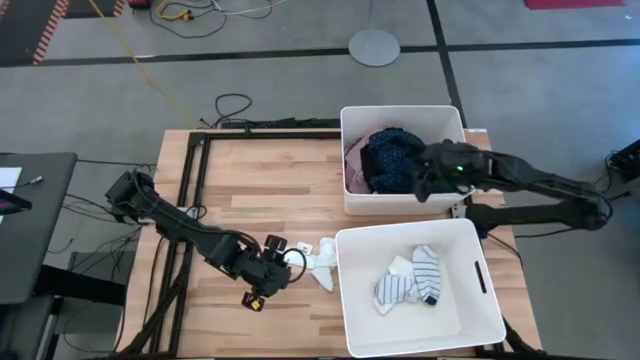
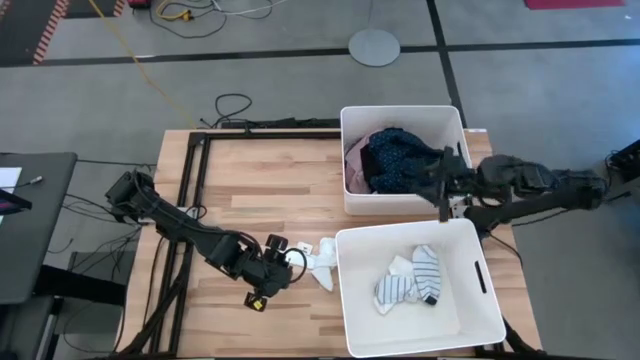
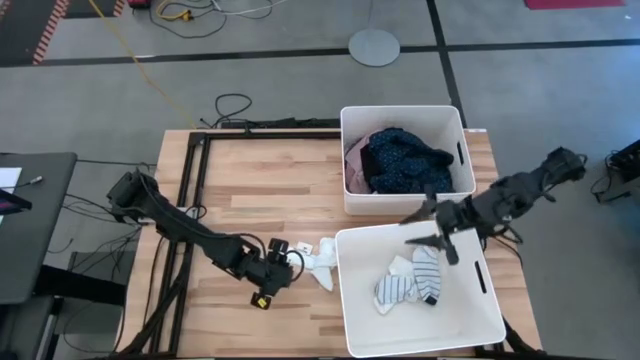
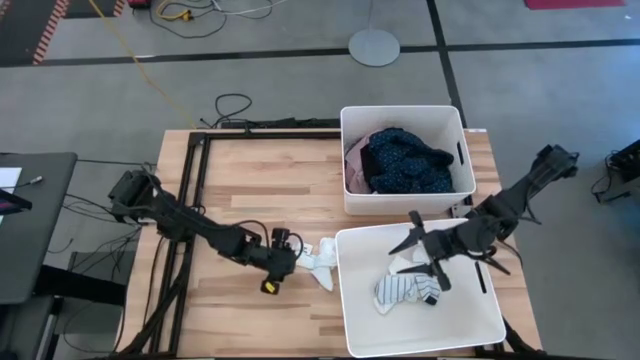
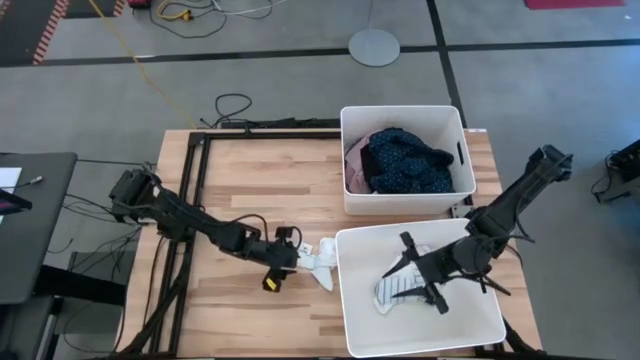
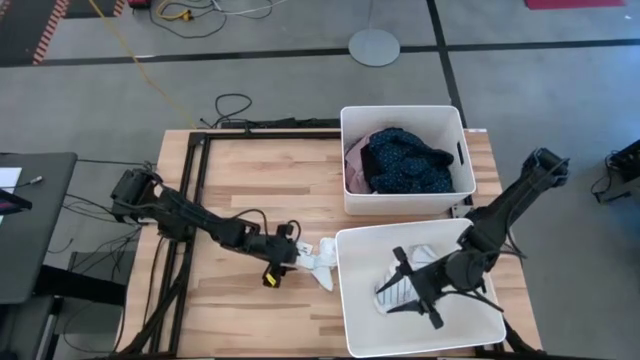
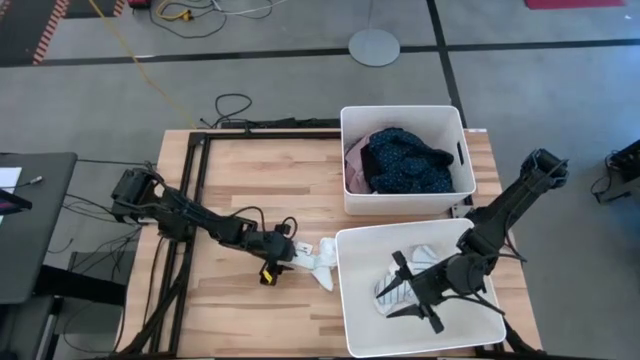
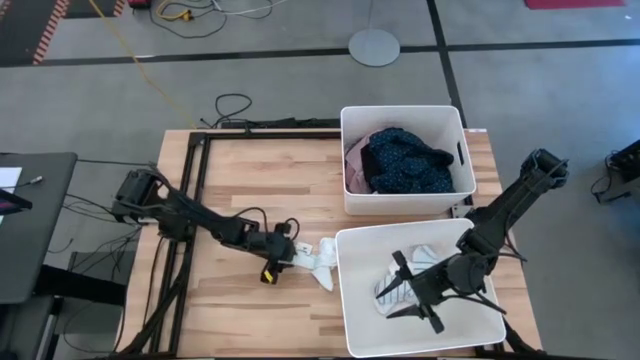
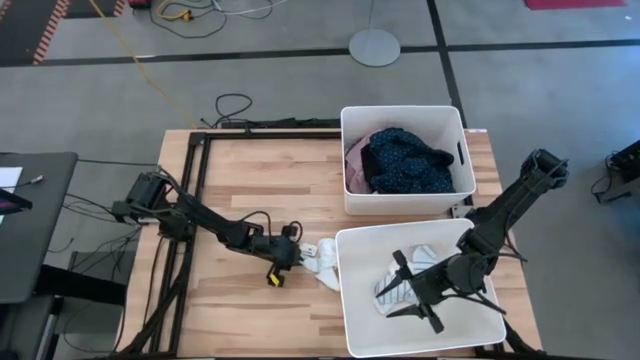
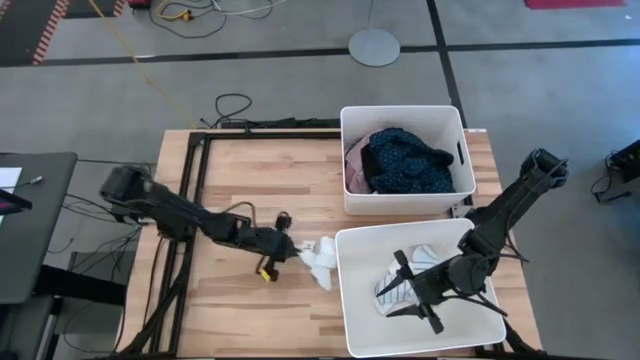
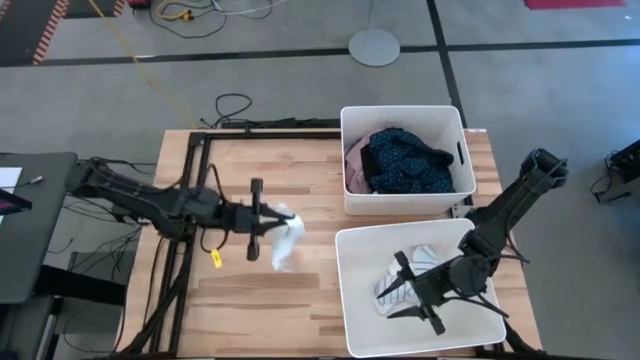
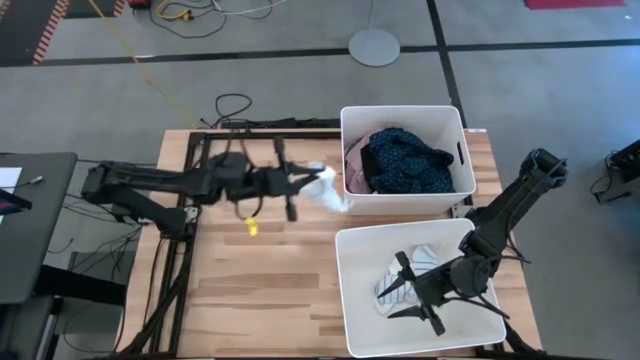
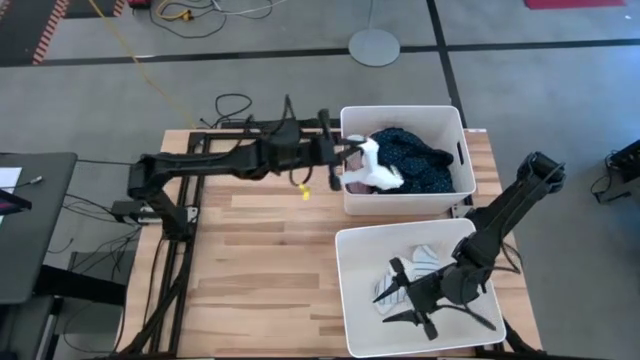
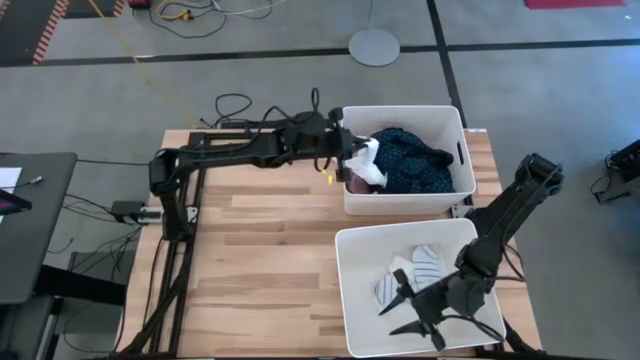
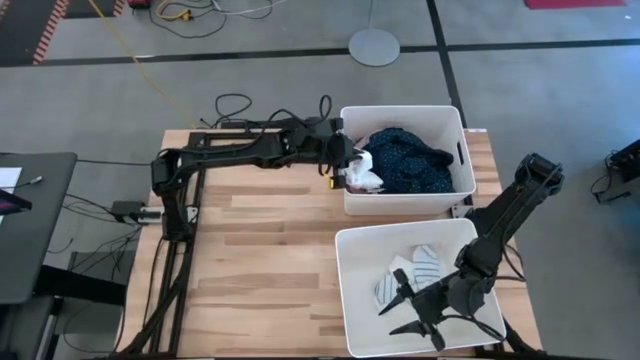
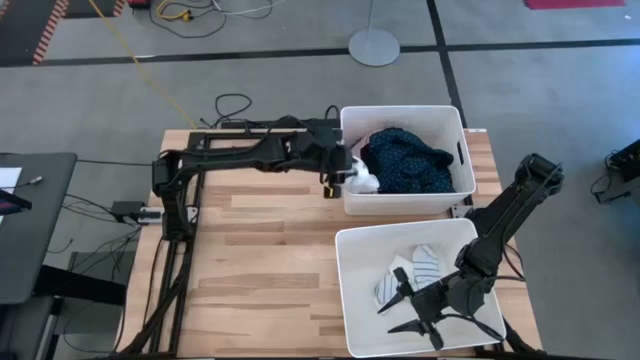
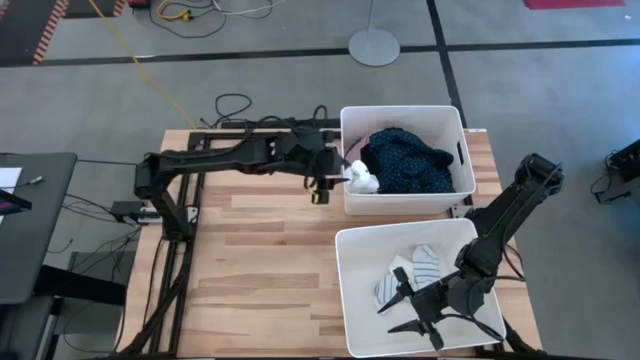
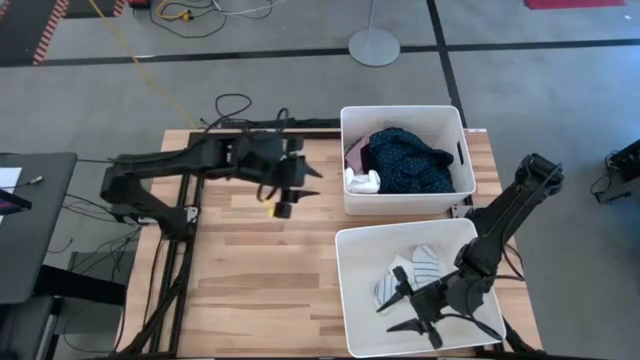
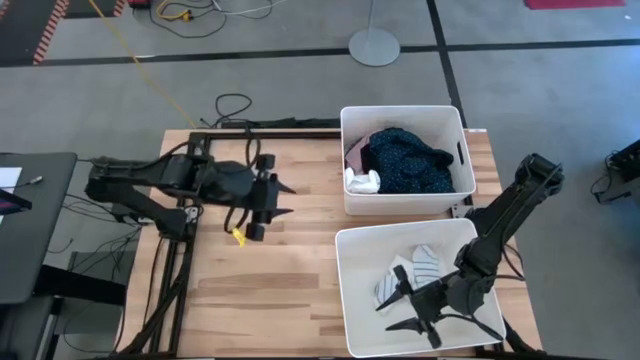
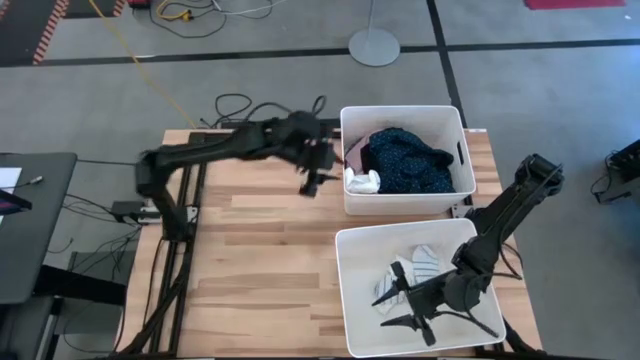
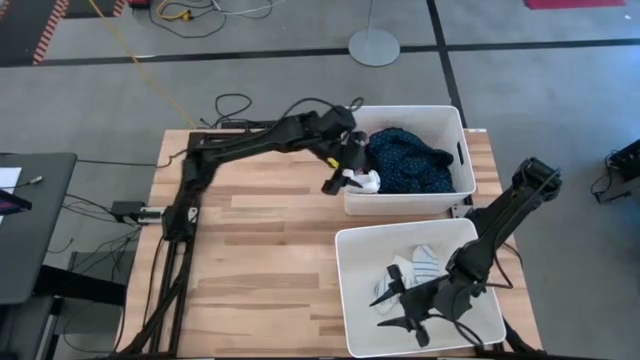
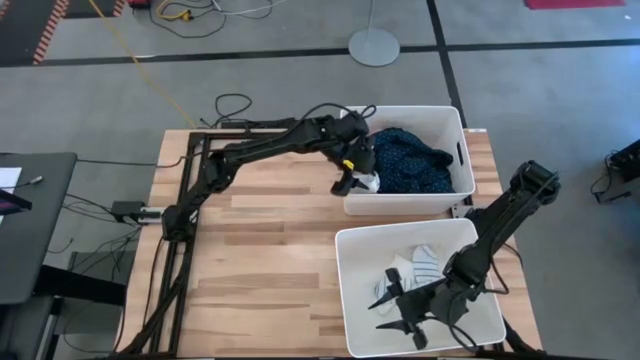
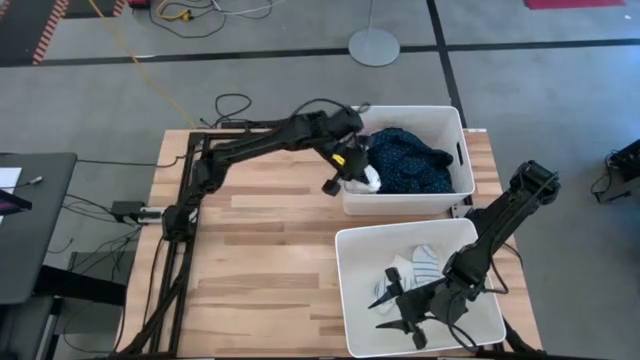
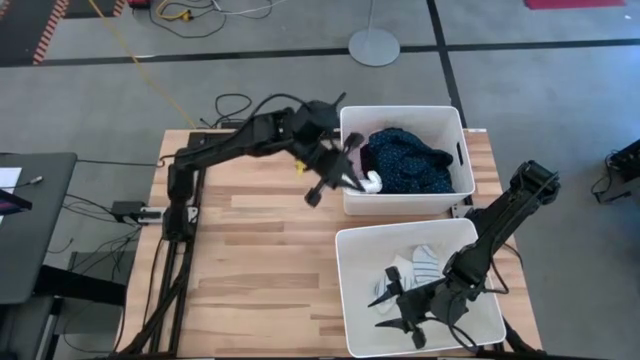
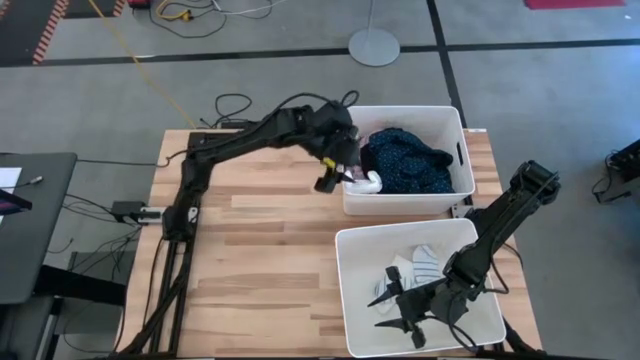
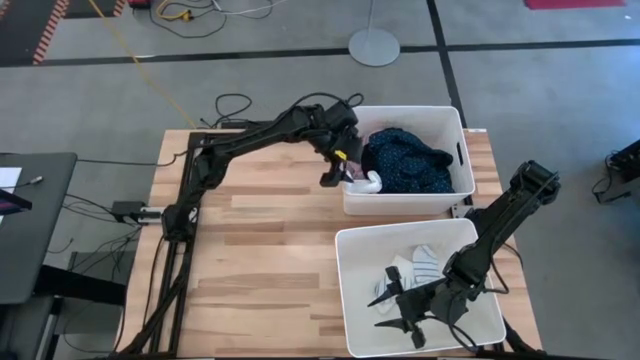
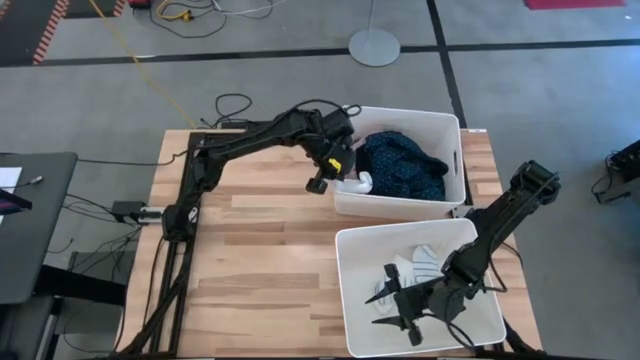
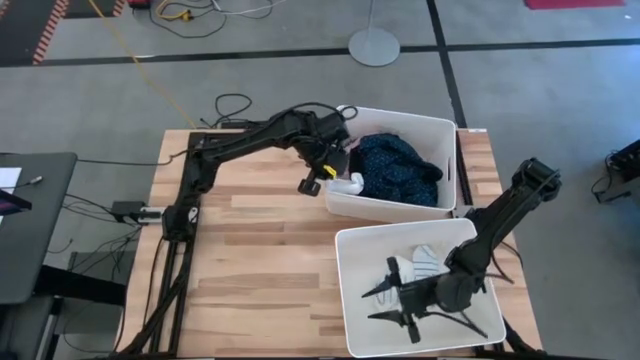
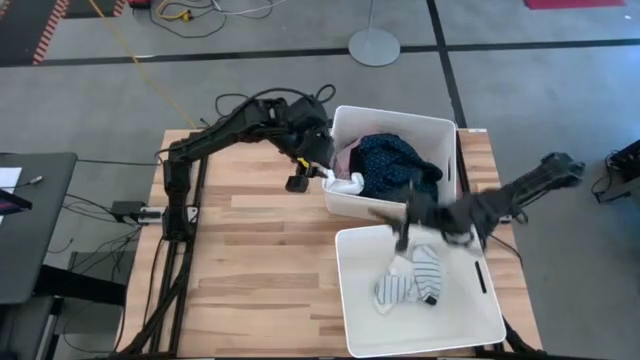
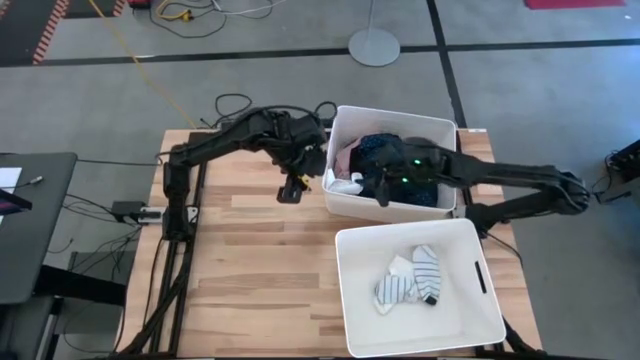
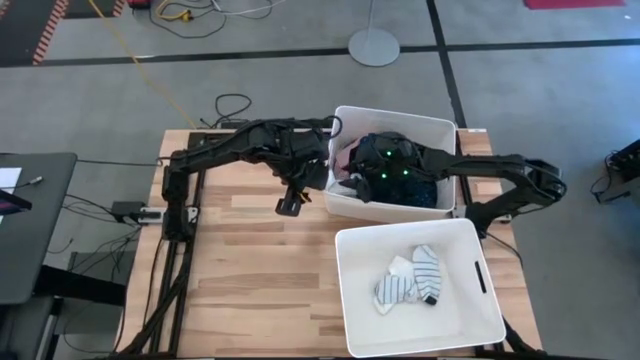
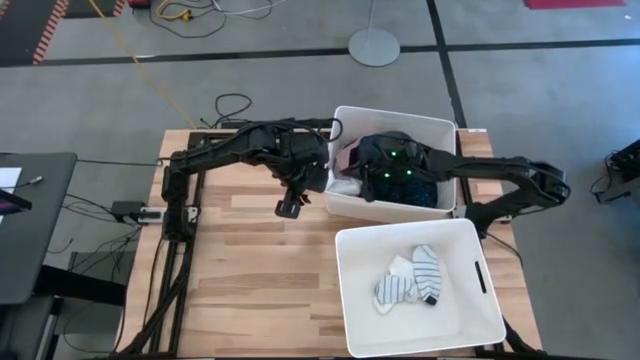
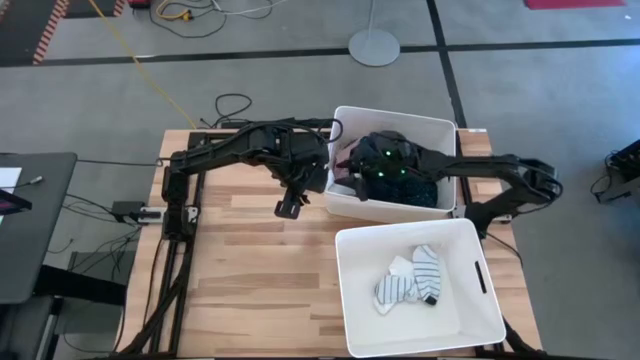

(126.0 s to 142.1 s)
Task: Sort clothes
Put the white socks into the top white laundry bin

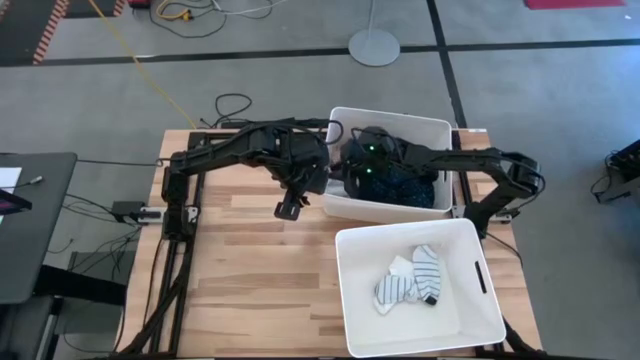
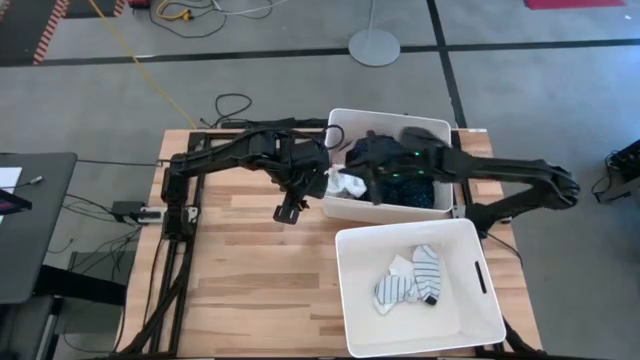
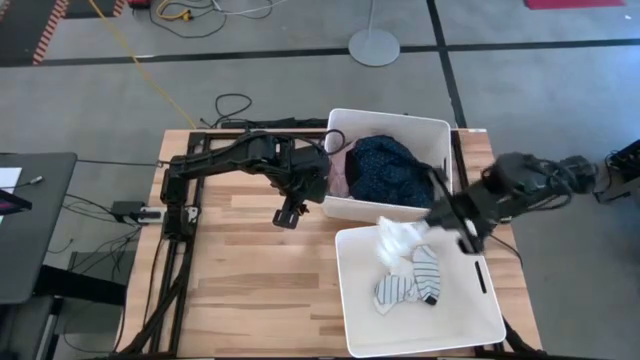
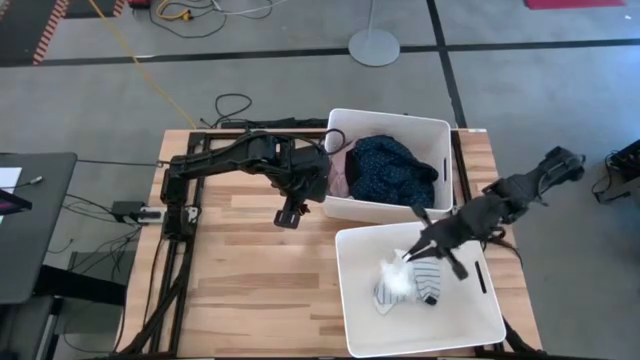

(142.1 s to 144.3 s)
Put the white sock into the bottom laundry bin

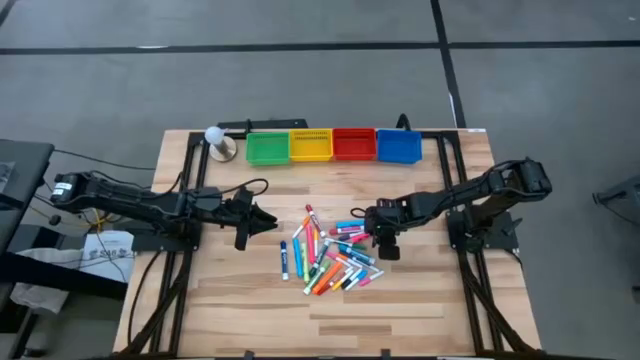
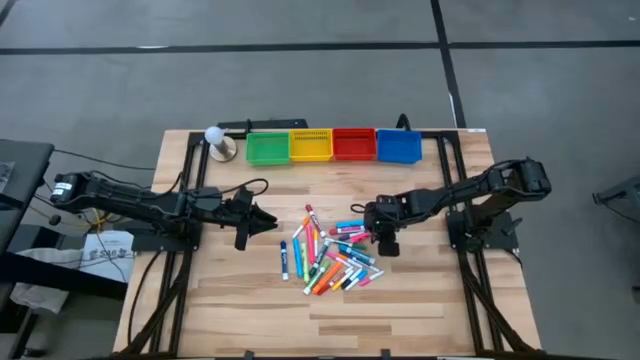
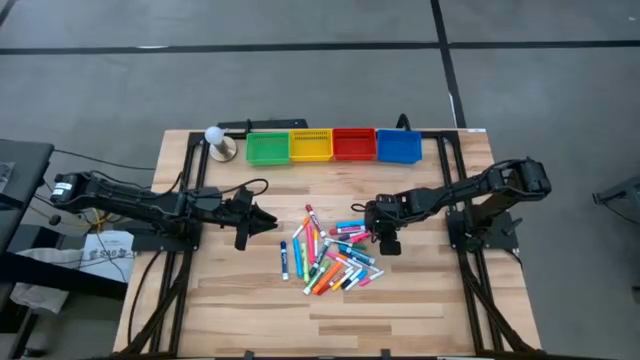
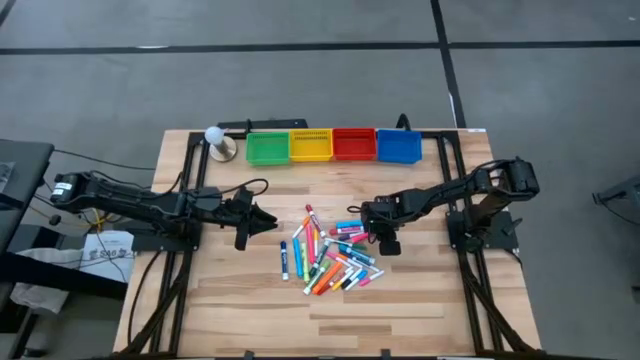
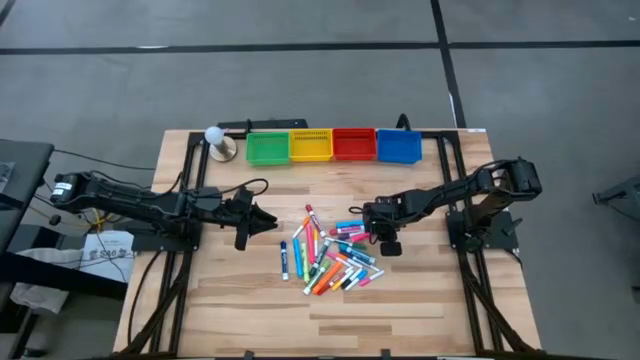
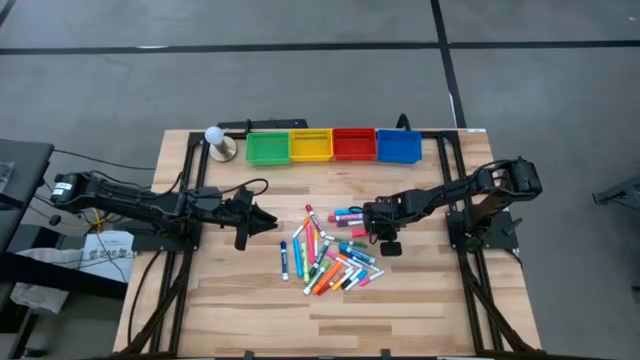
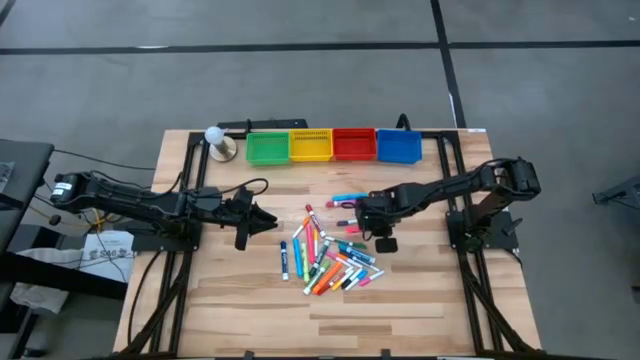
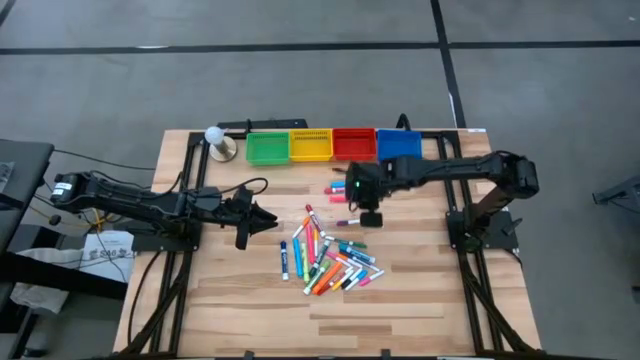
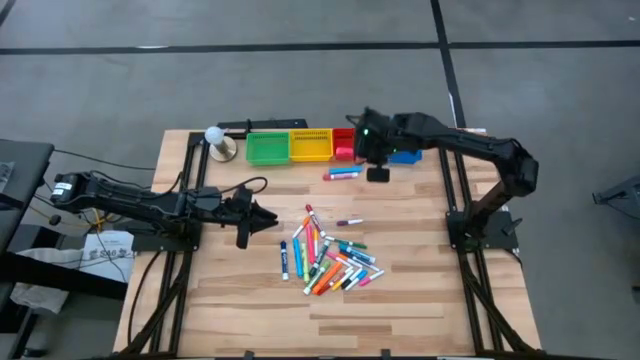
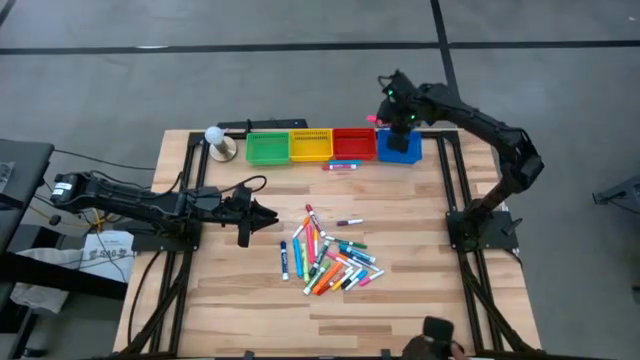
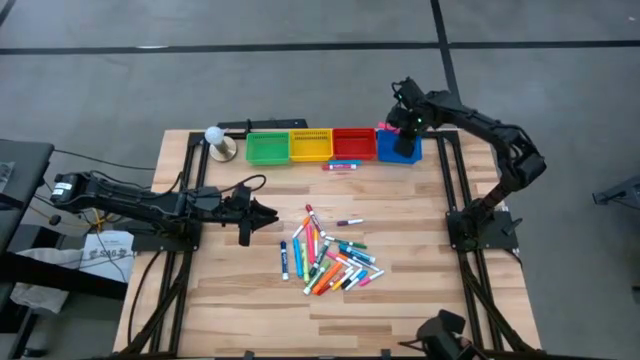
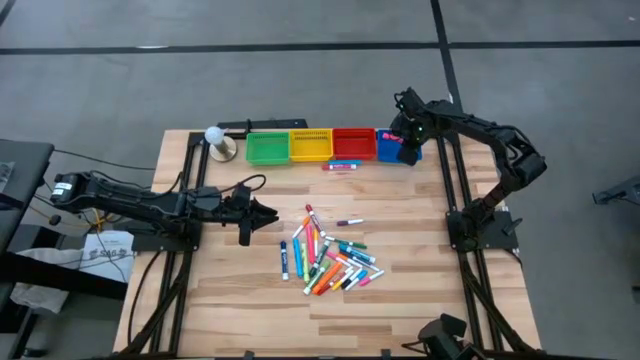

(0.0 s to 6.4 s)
Task: Pick & Place Markers
Put the pink highlighter pen into the blue basket
